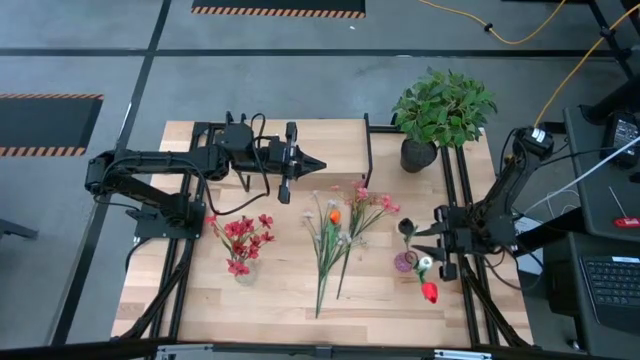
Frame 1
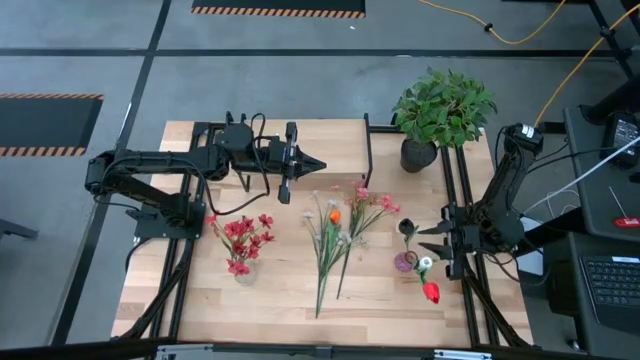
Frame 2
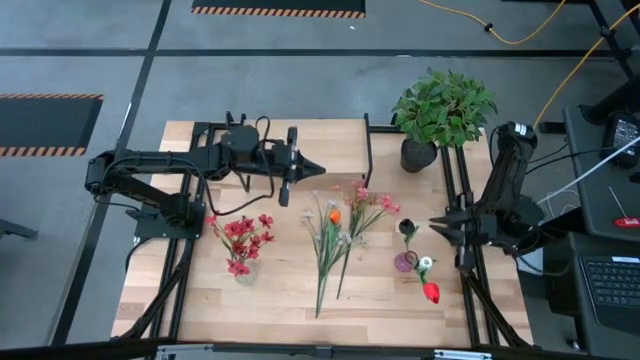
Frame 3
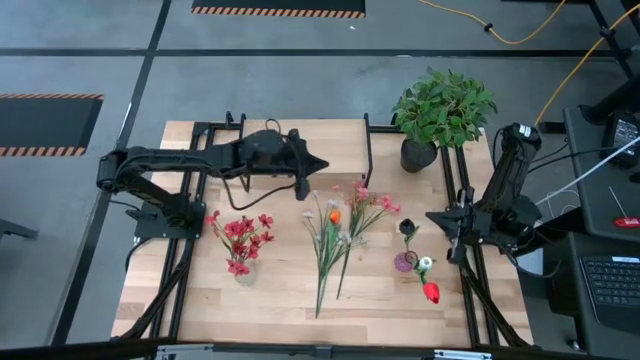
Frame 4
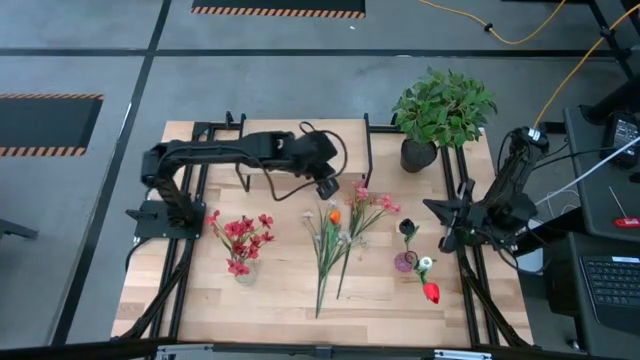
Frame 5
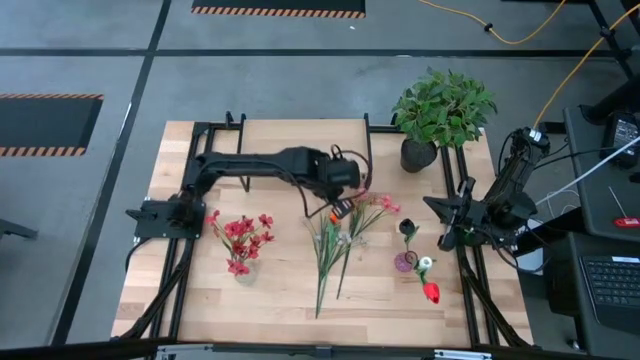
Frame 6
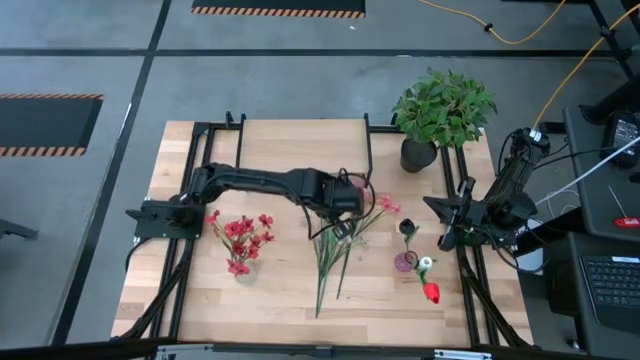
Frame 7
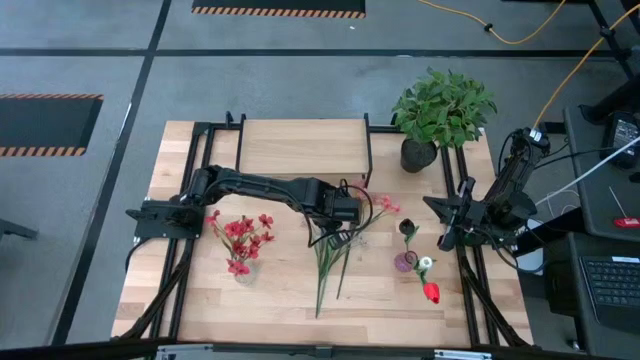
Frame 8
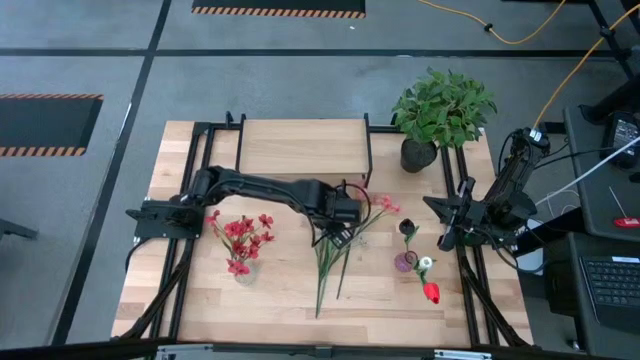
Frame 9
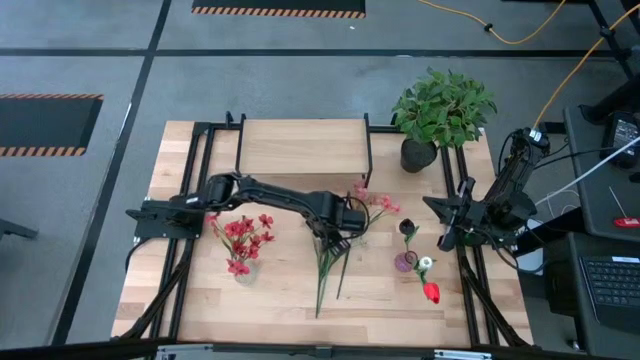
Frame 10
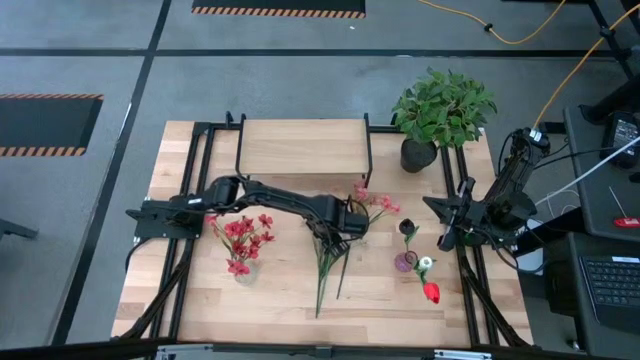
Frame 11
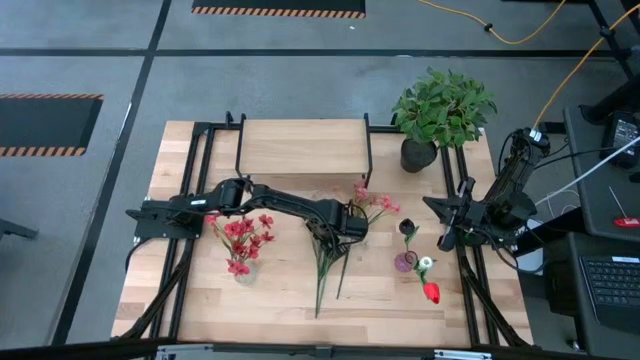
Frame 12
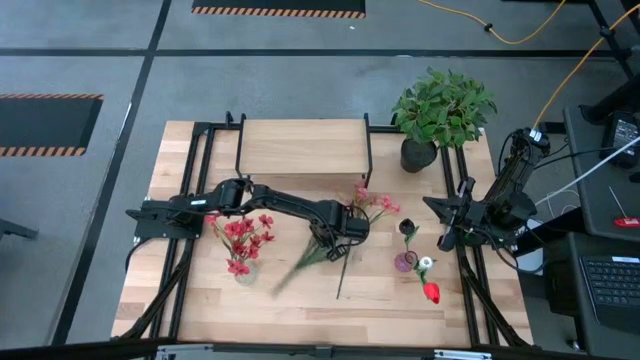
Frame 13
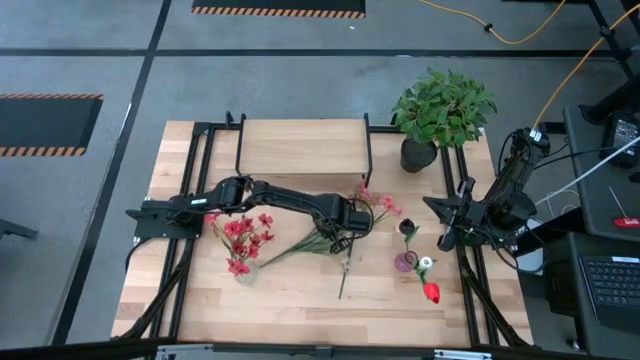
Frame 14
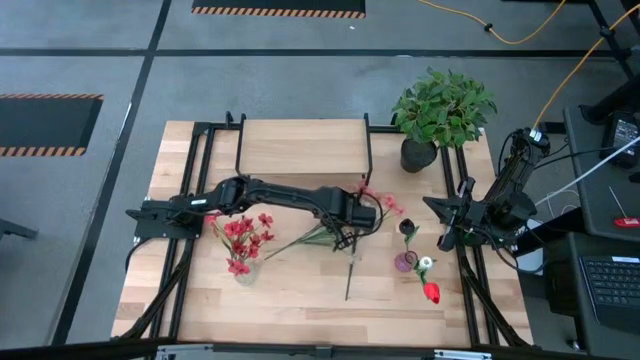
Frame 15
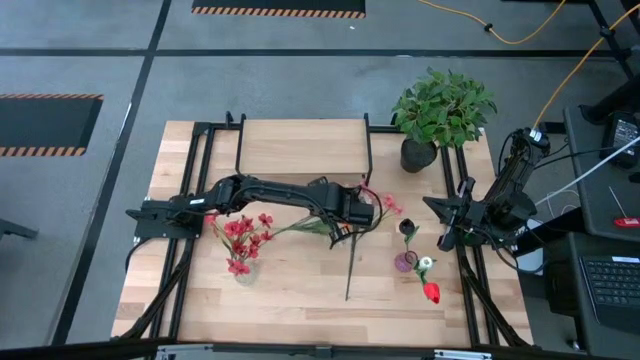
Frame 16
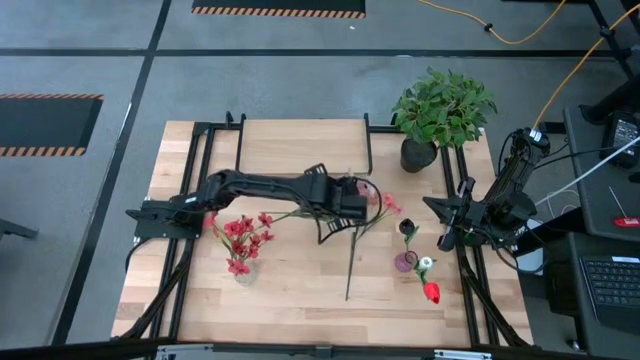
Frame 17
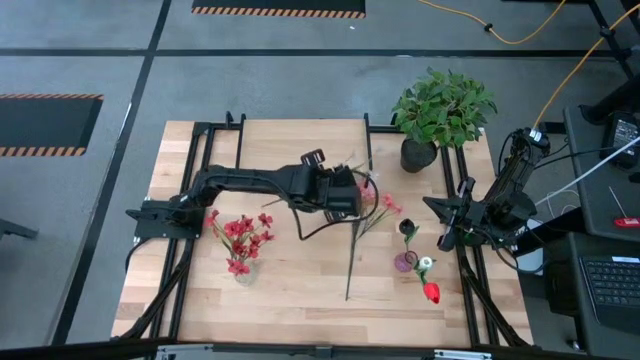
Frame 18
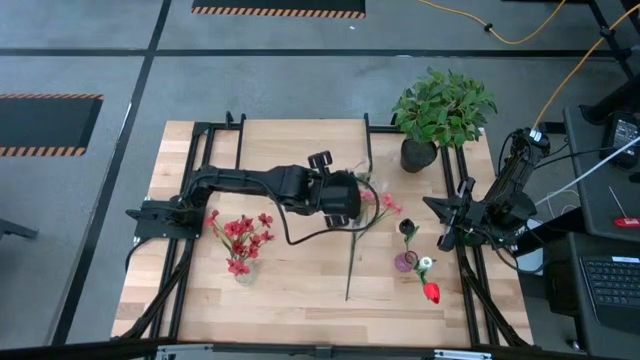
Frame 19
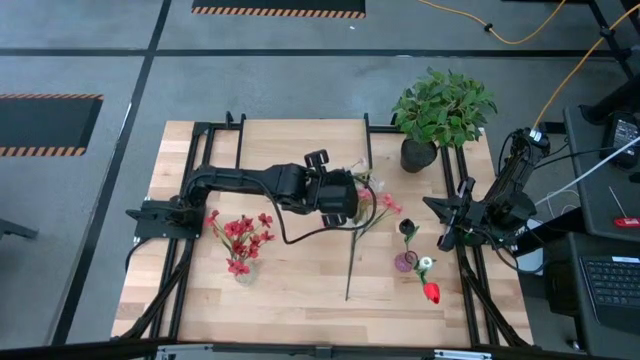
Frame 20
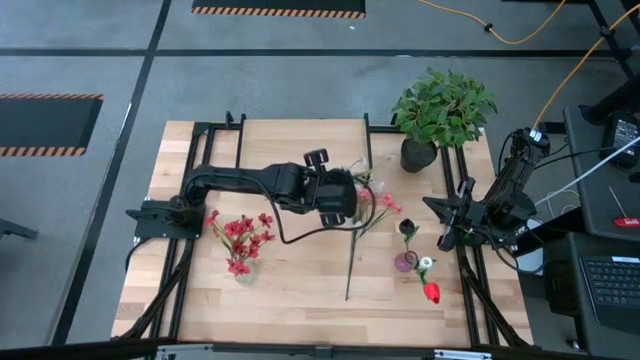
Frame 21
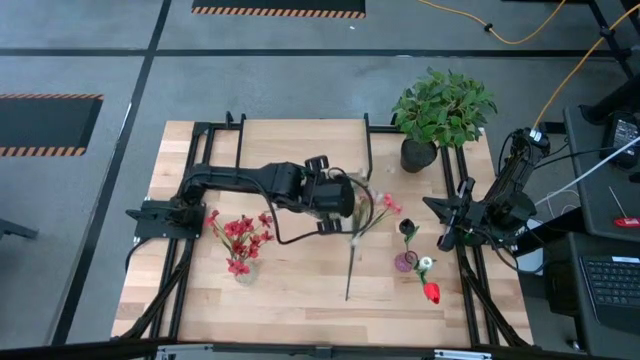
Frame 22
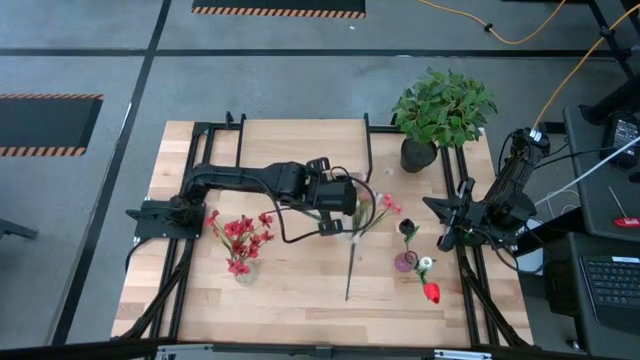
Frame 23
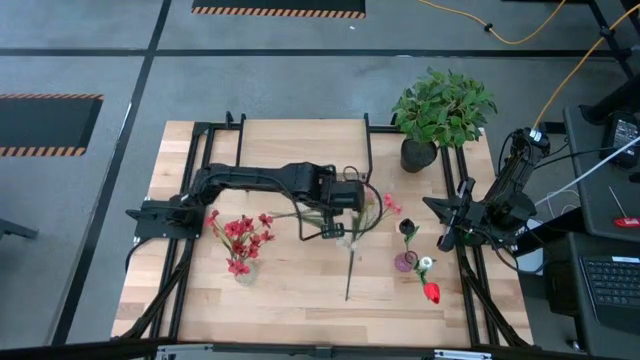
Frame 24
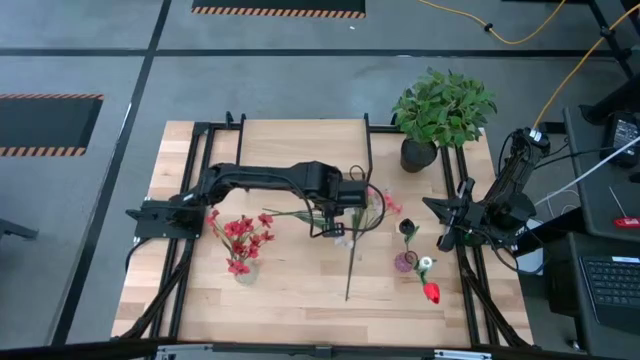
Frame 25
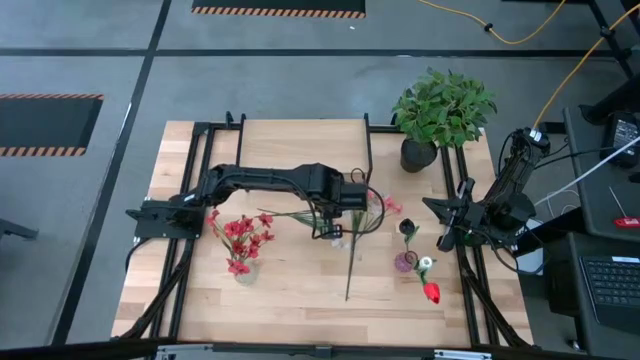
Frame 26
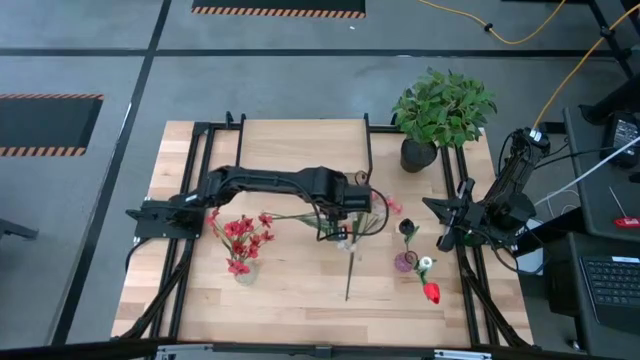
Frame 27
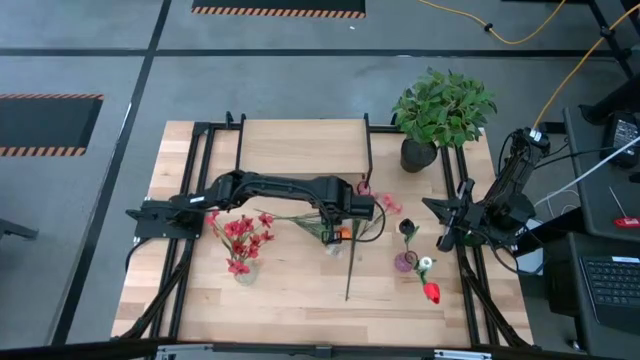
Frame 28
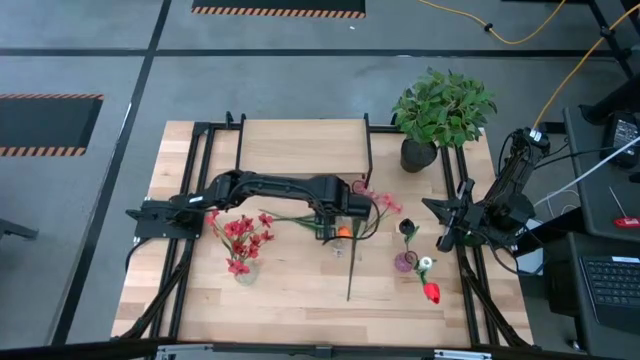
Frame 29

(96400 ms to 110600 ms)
Task: Pick and place flowers into a vace then onto a shelf
Put the white flowers into the transparent vase

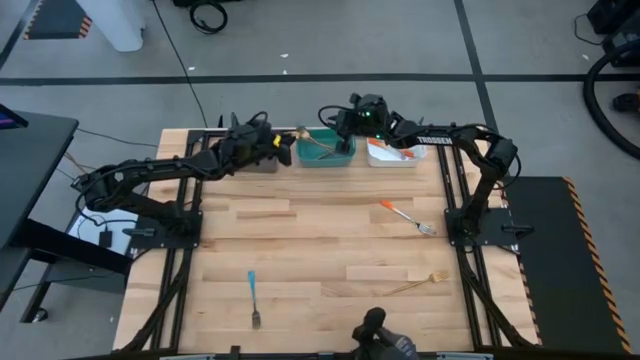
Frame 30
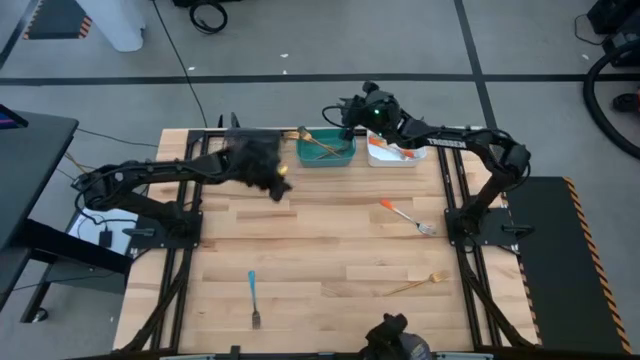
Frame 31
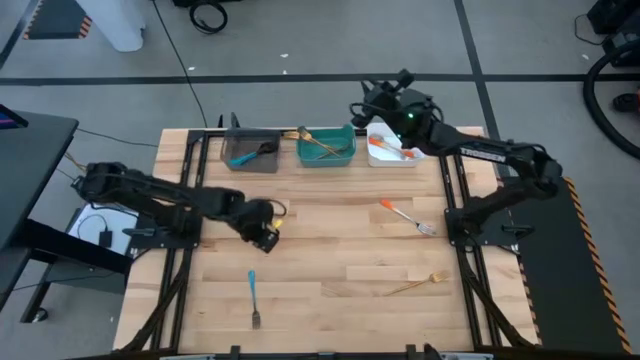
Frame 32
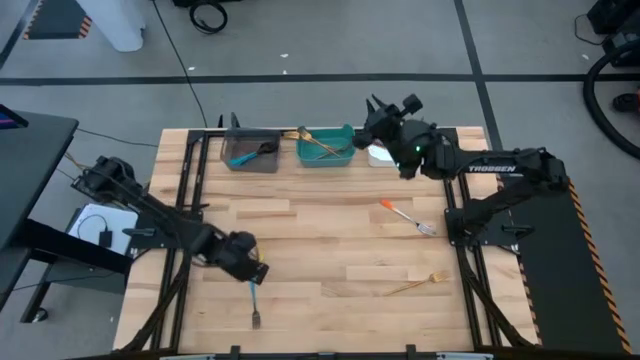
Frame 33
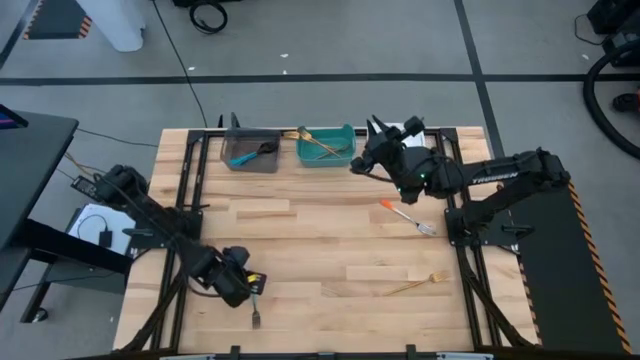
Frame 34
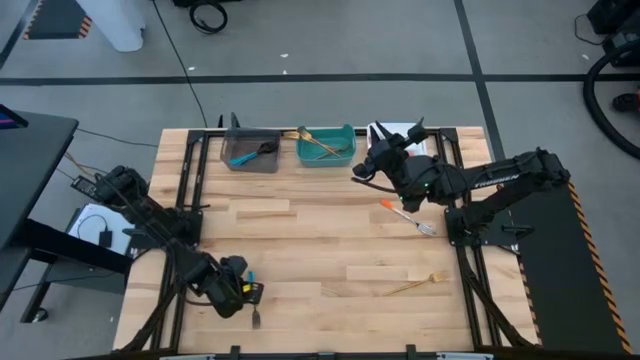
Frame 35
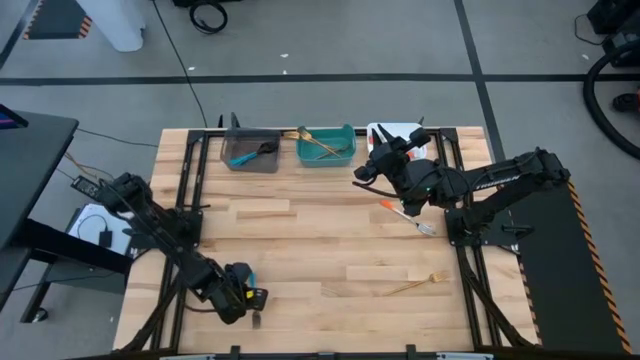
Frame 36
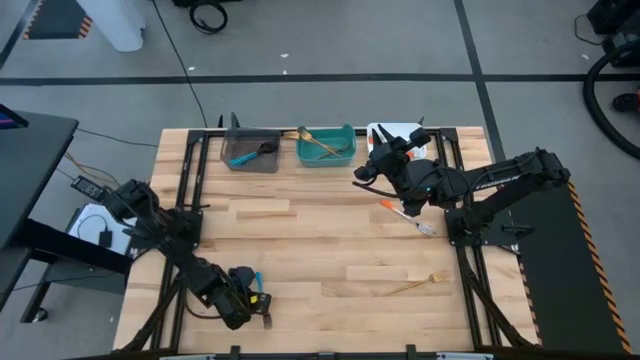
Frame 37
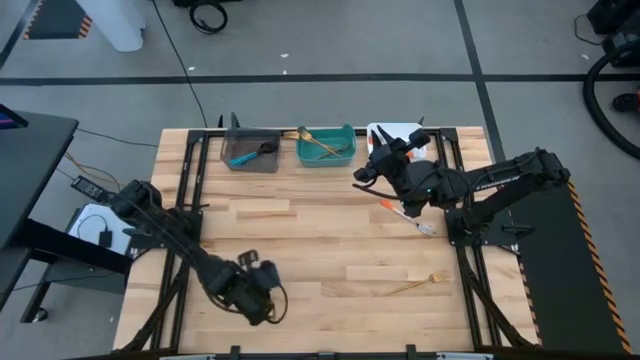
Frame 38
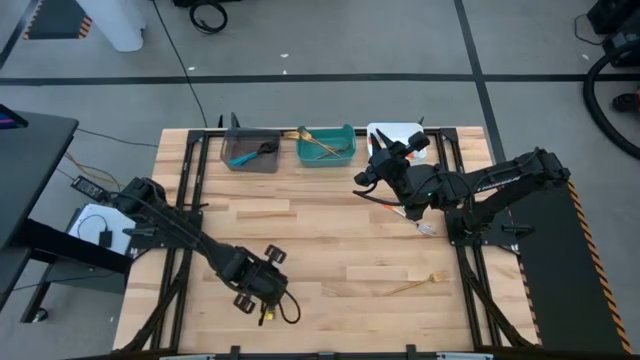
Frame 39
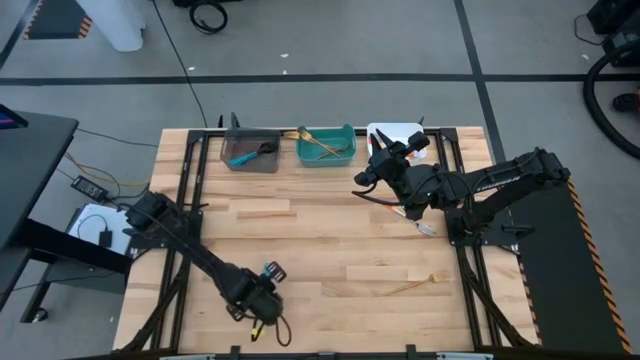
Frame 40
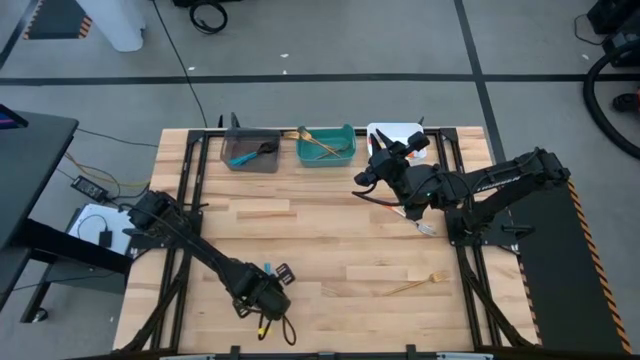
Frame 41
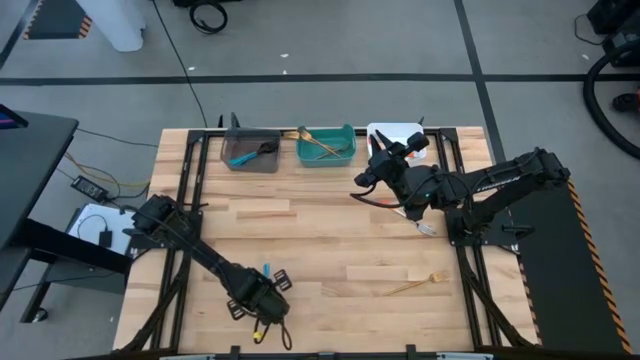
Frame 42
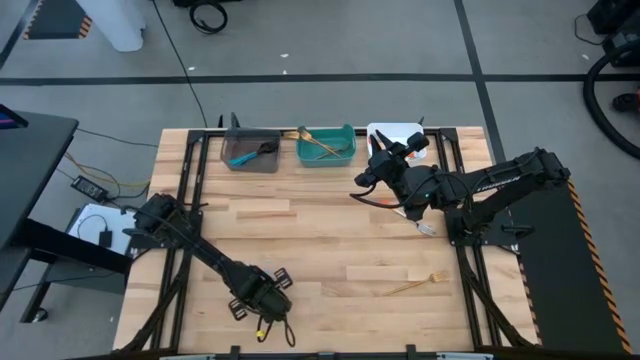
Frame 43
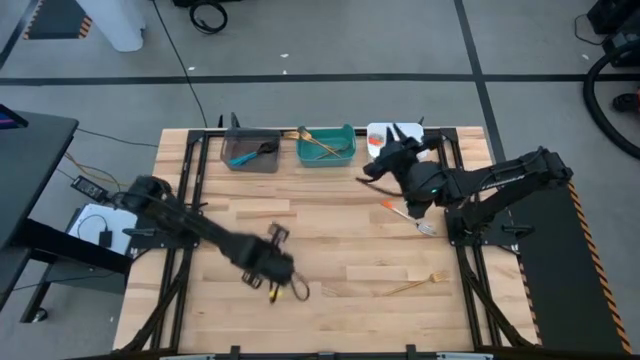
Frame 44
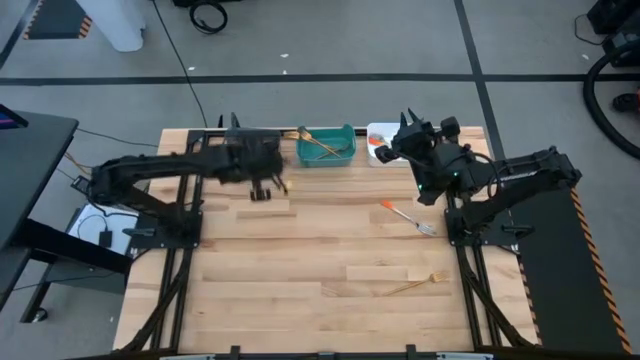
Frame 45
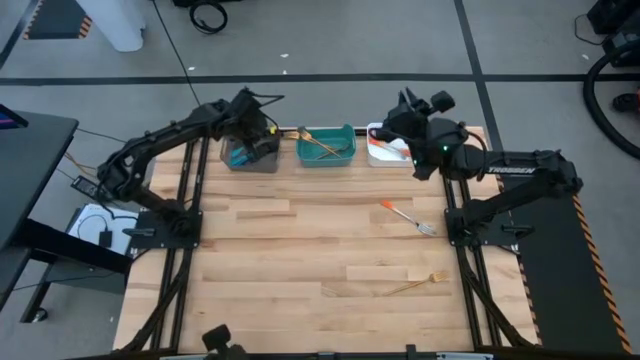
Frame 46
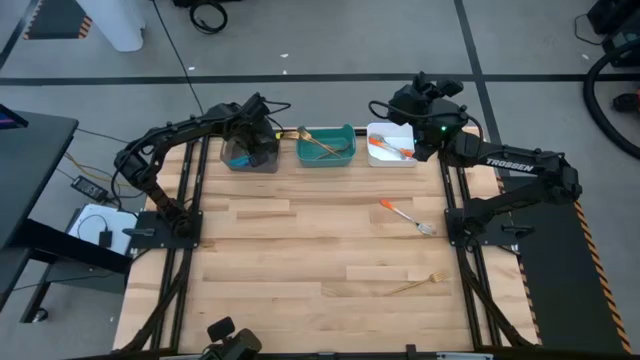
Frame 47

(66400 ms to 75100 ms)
Task: Sort silverware by color (type)
Put the blue fork into the black transparent bin
